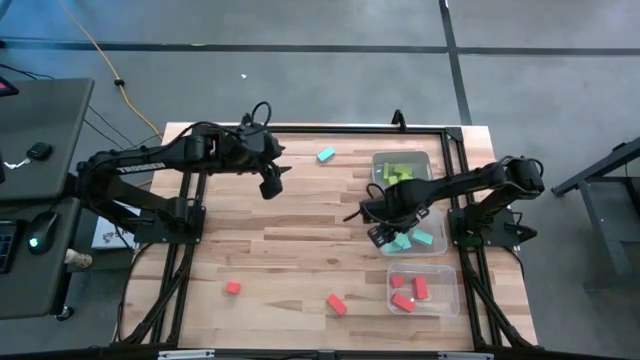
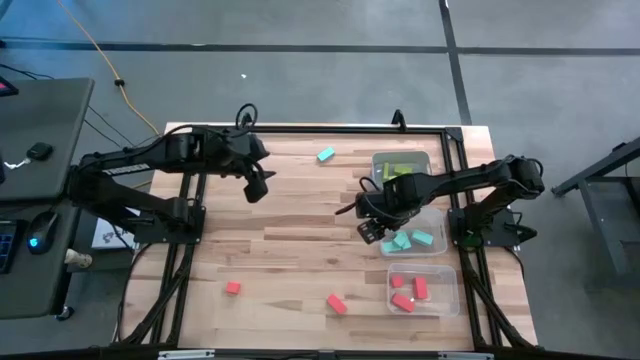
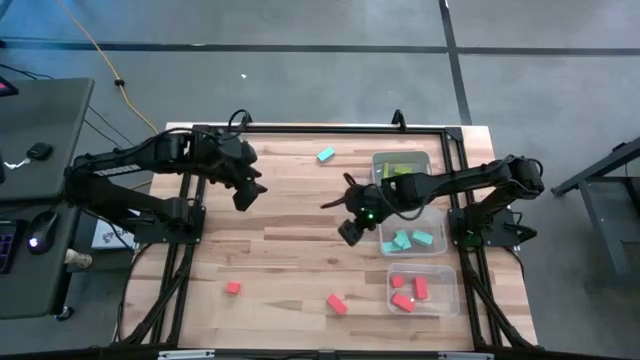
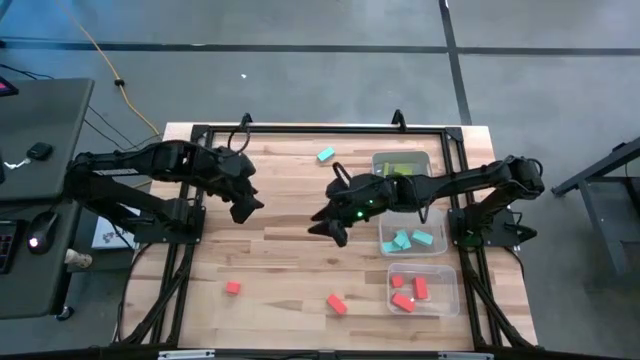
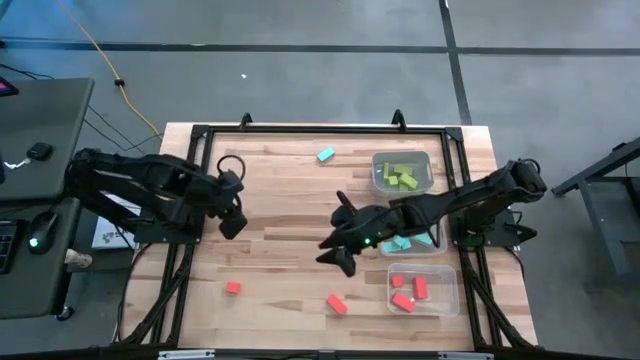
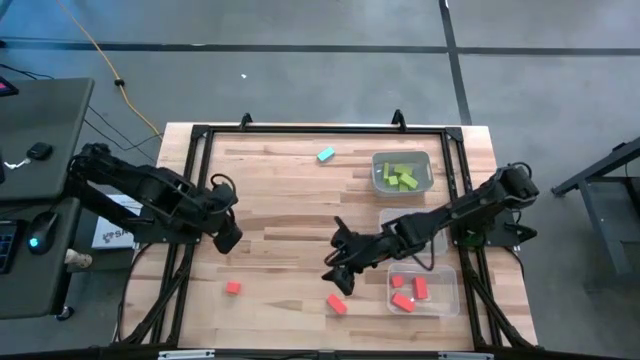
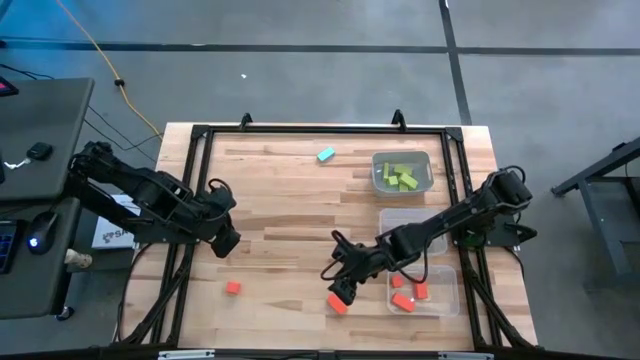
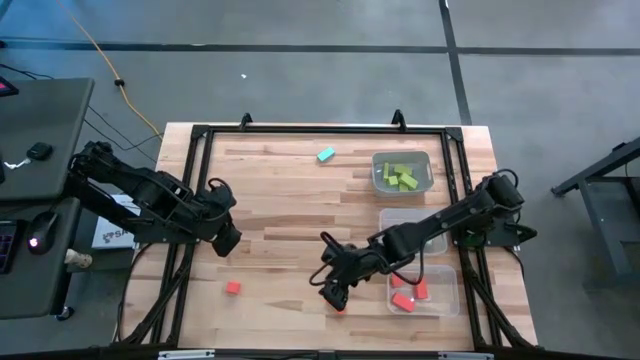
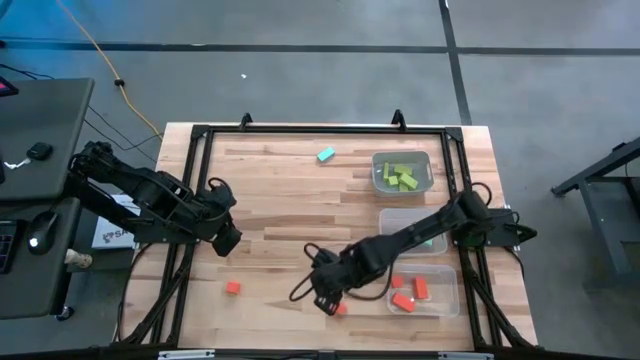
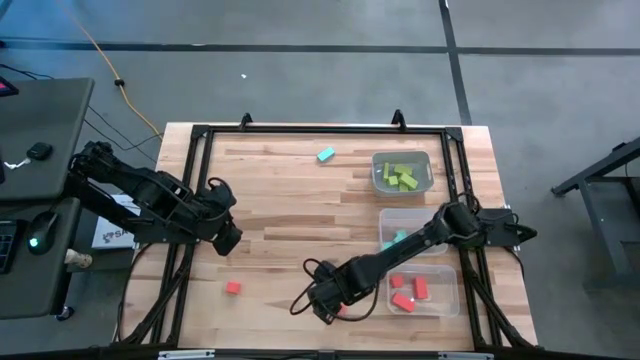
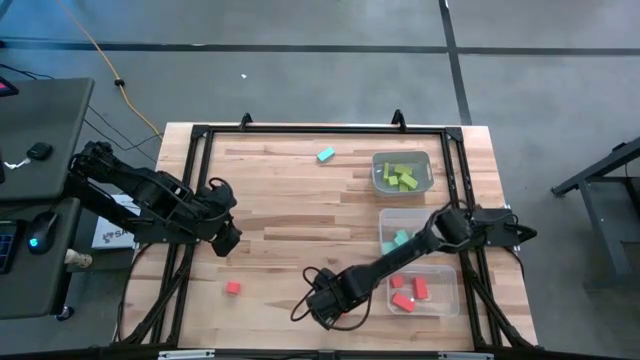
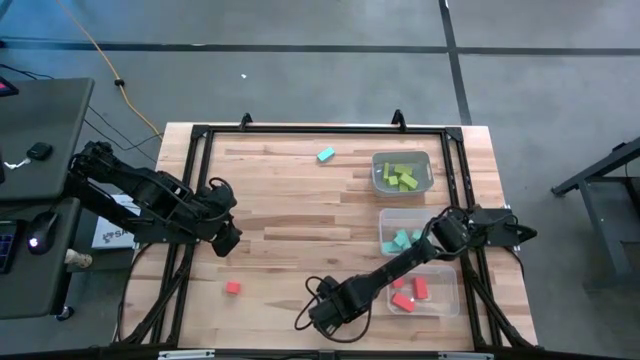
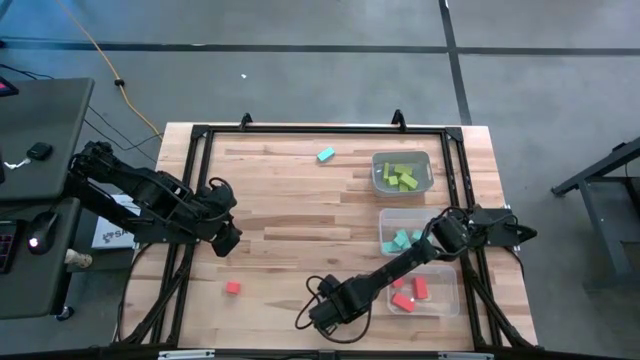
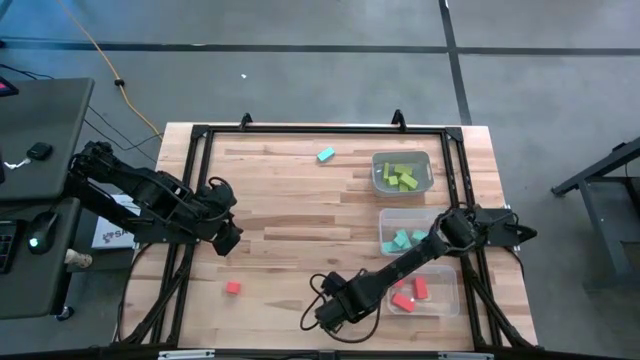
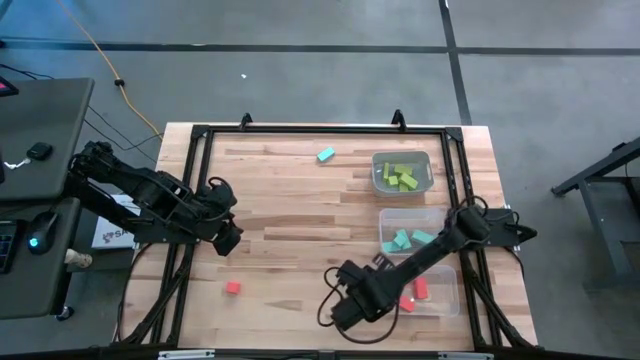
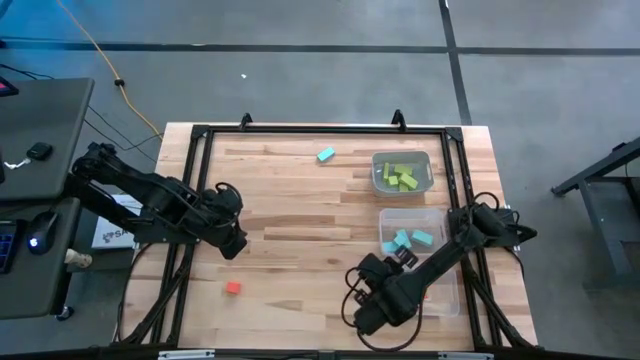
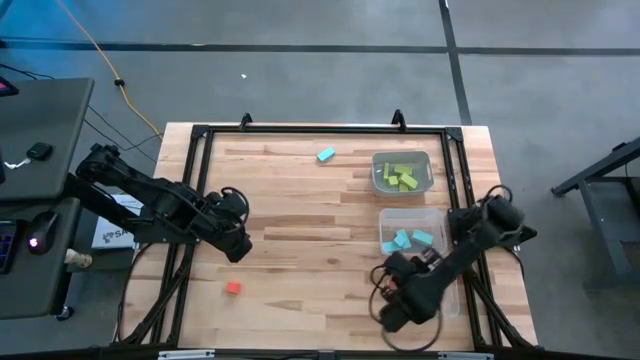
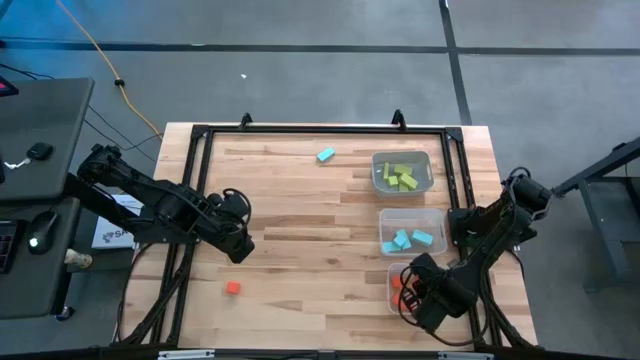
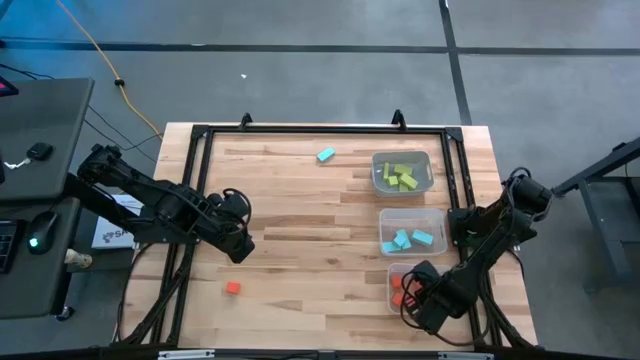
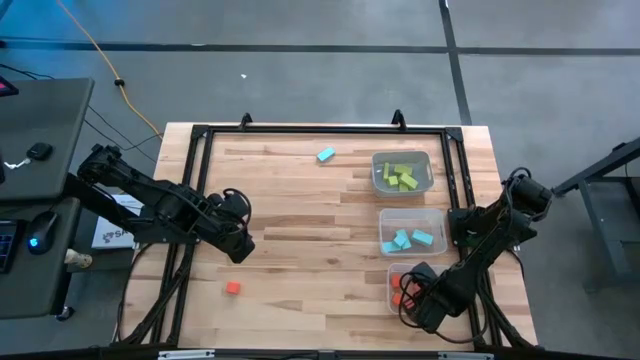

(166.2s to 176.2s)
Task: Sort & place blocks by color
Put the orange block into the bottom transparent bin

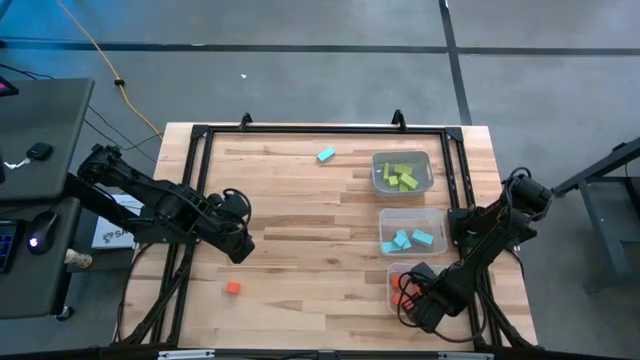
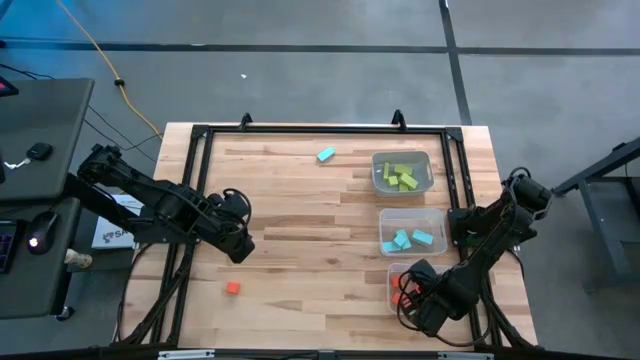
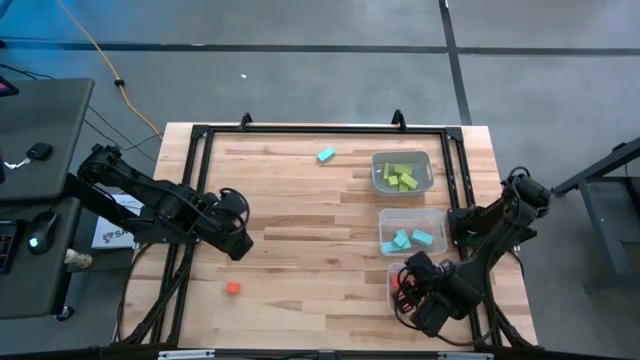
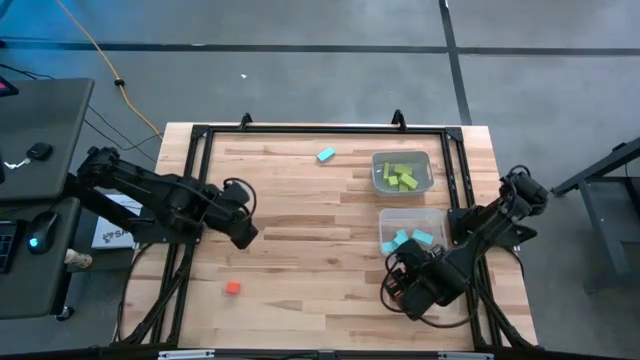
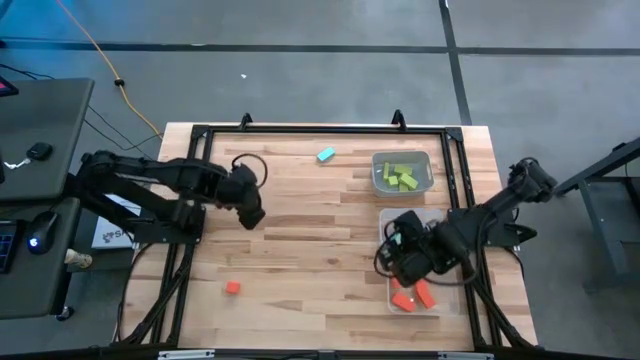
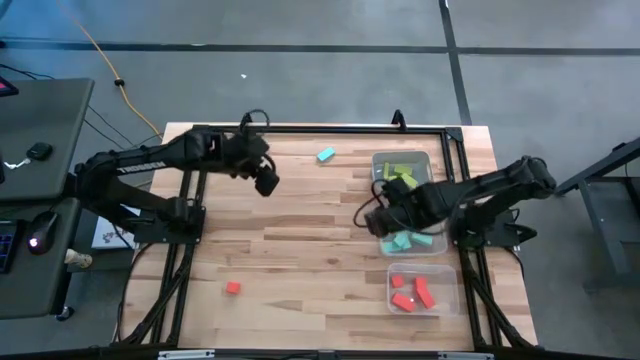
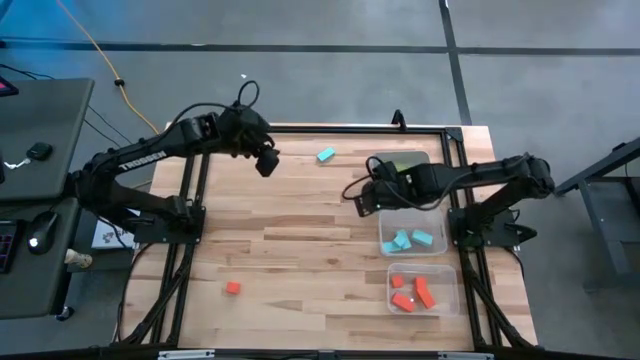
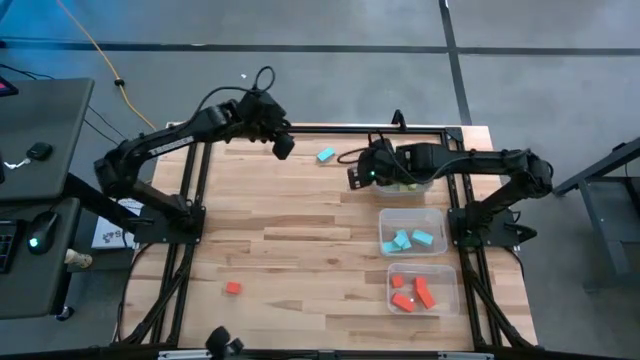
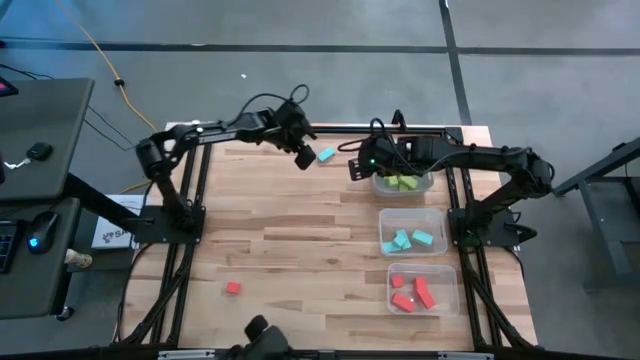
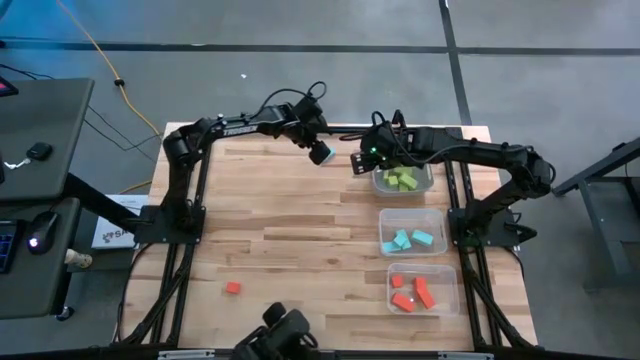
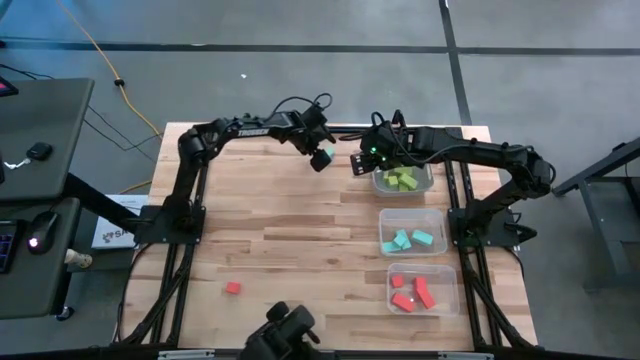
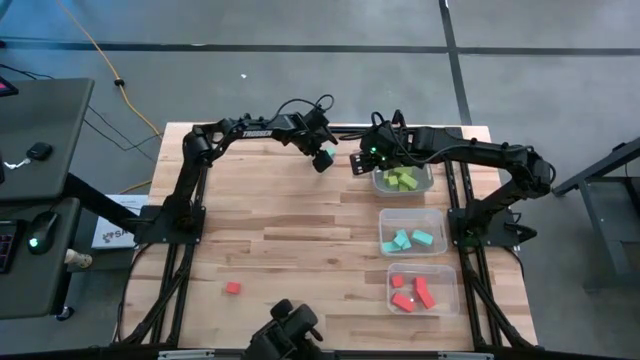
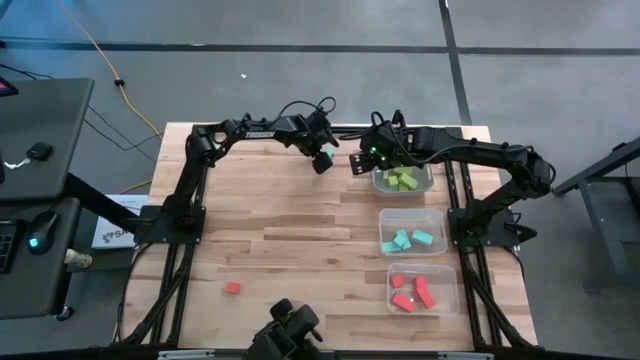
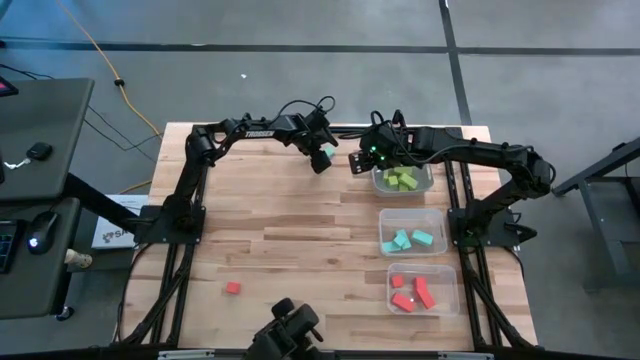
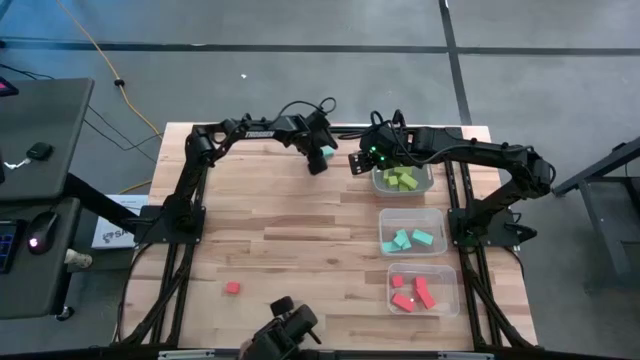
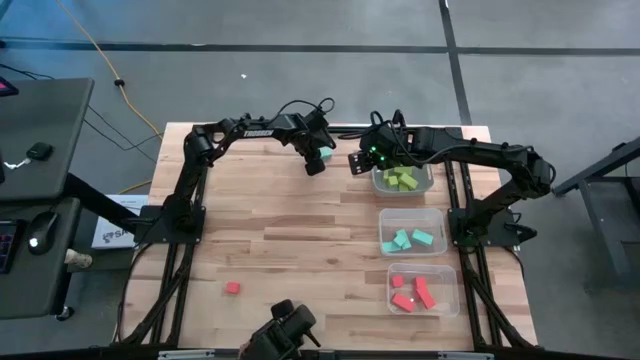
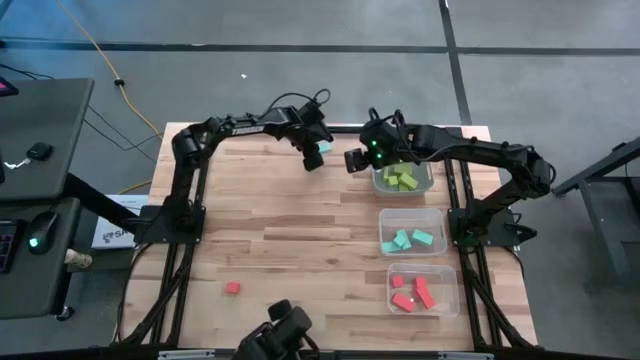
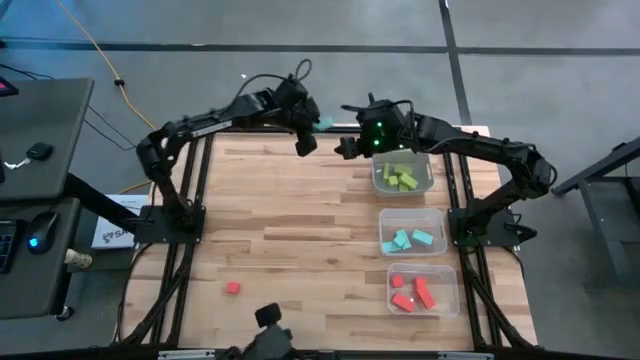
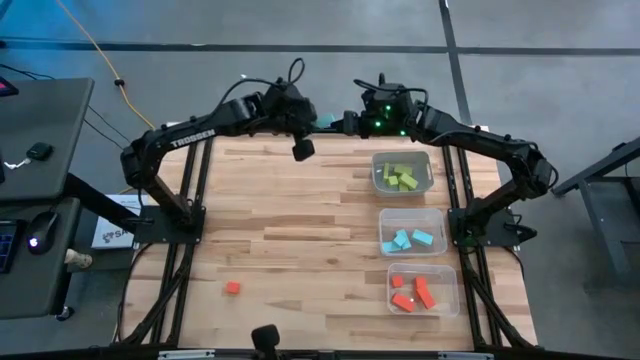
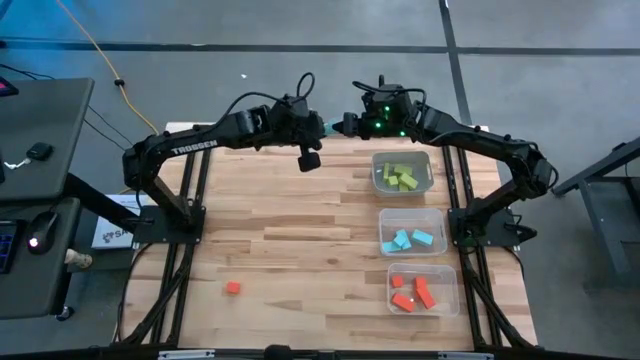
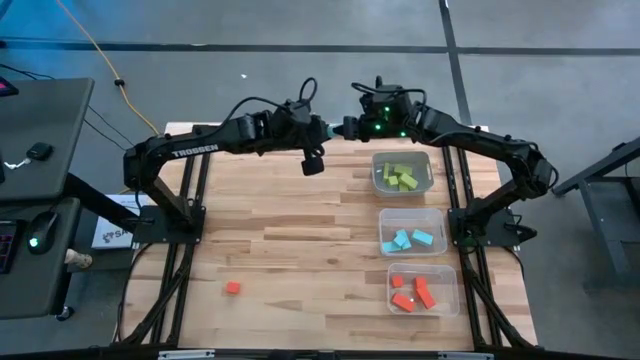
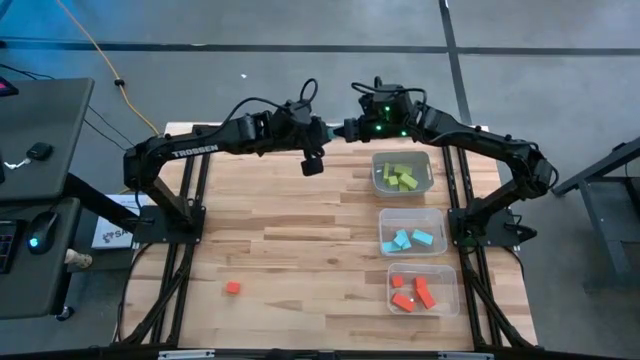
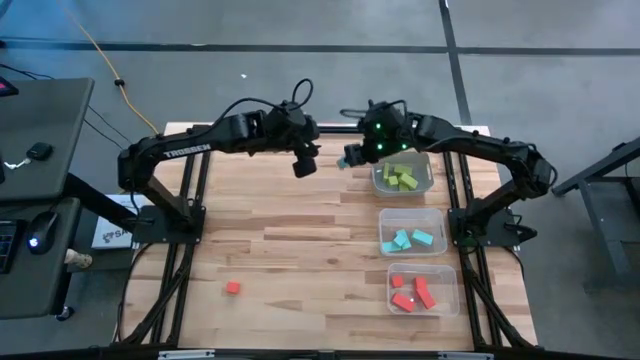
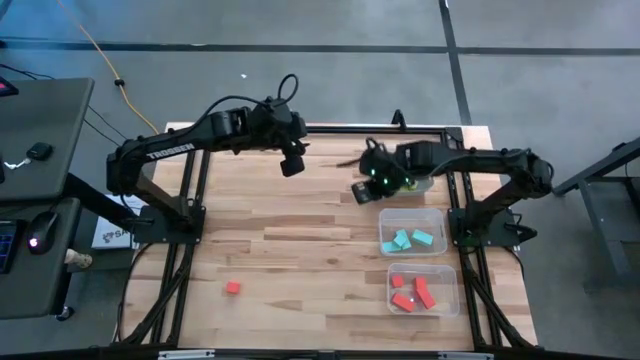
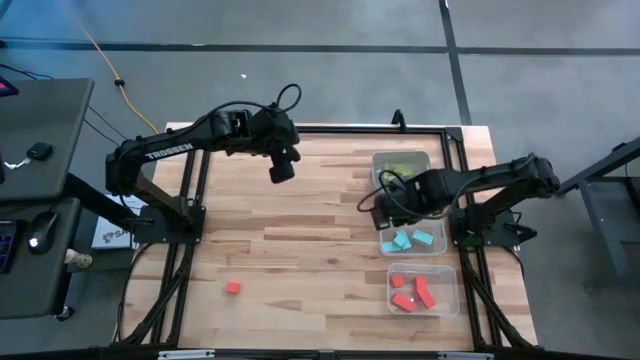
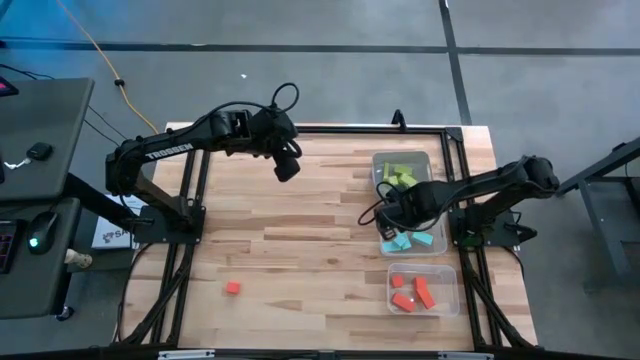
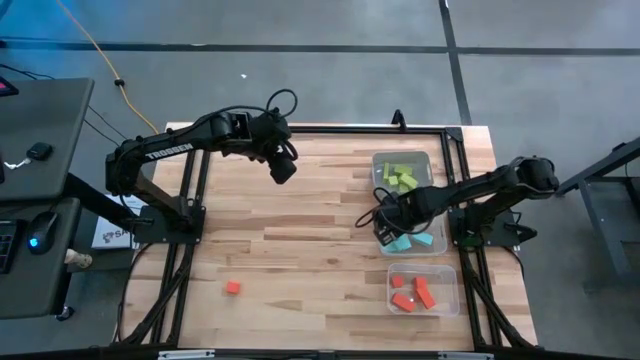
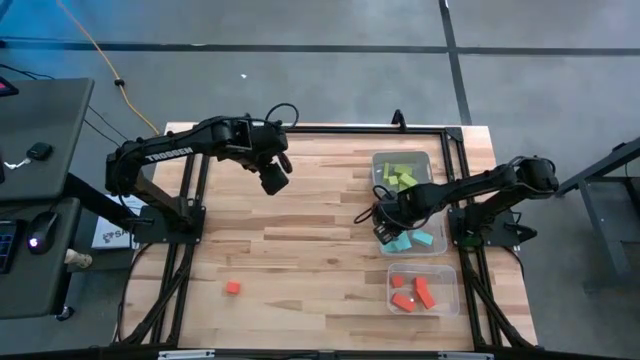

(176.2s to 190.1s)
Put the light blue block into the top transparent bin
